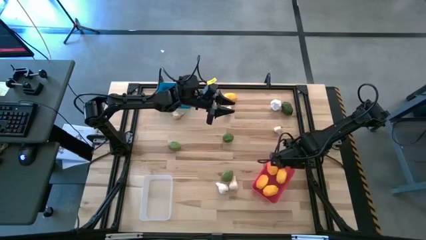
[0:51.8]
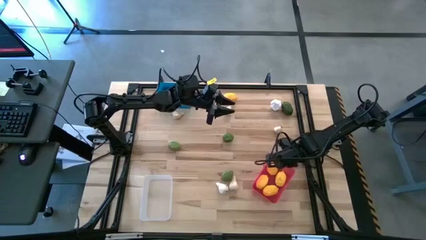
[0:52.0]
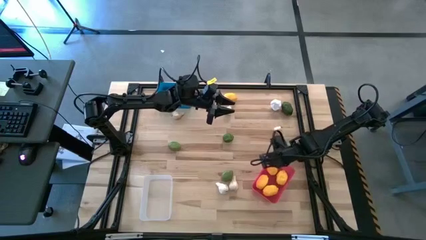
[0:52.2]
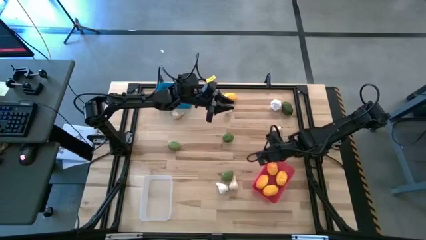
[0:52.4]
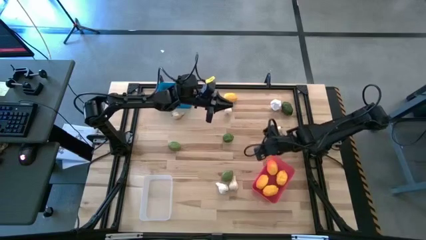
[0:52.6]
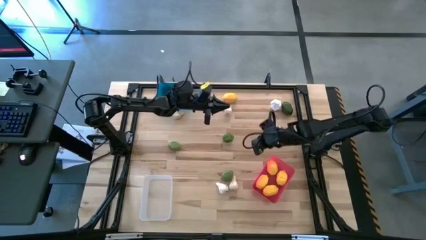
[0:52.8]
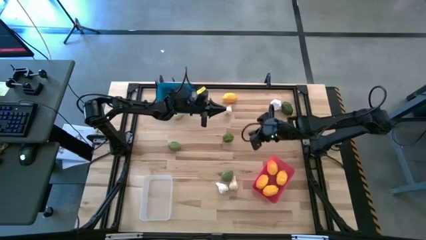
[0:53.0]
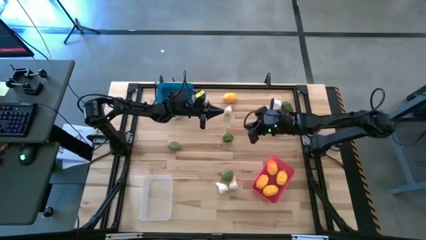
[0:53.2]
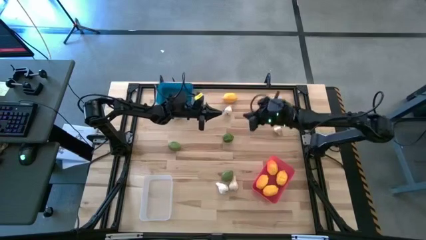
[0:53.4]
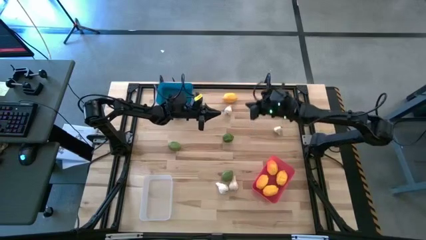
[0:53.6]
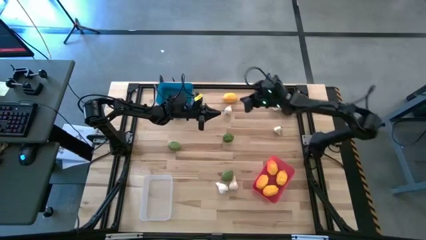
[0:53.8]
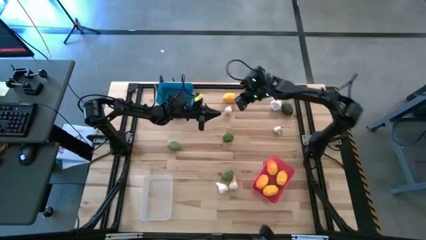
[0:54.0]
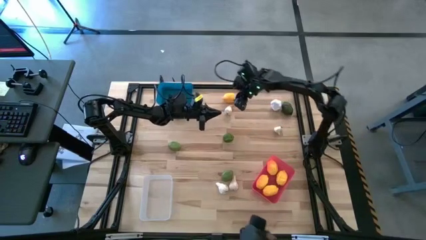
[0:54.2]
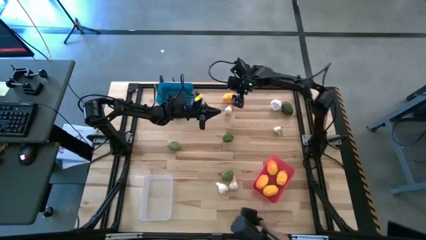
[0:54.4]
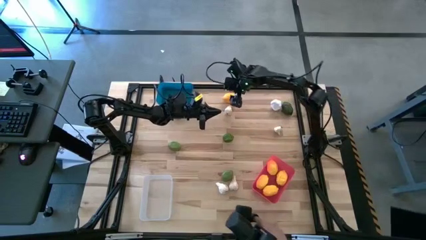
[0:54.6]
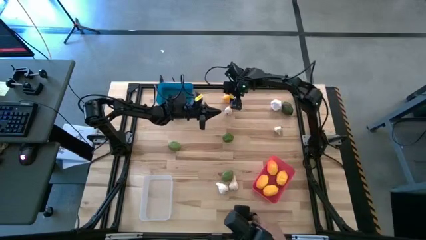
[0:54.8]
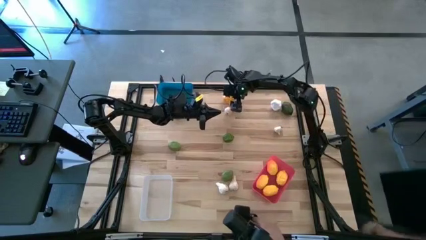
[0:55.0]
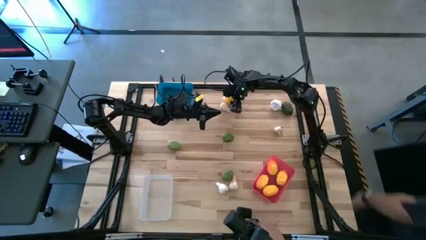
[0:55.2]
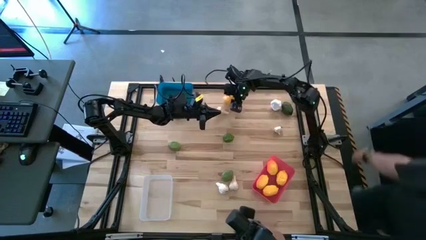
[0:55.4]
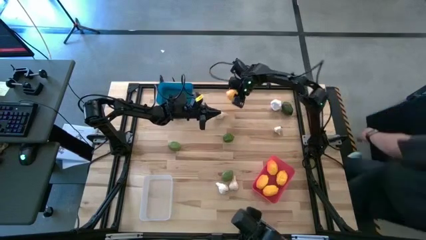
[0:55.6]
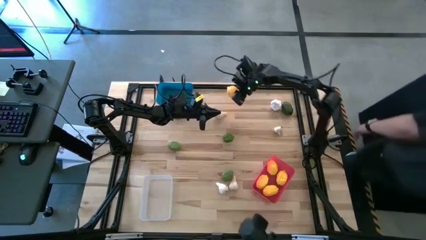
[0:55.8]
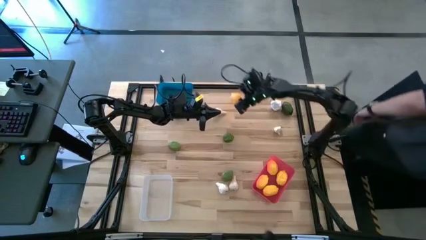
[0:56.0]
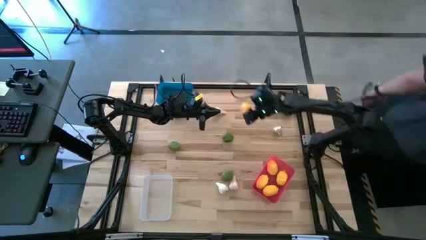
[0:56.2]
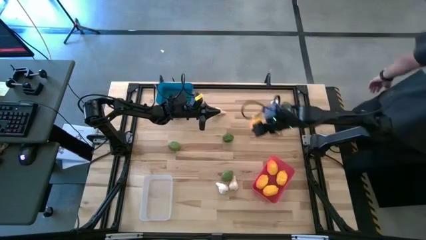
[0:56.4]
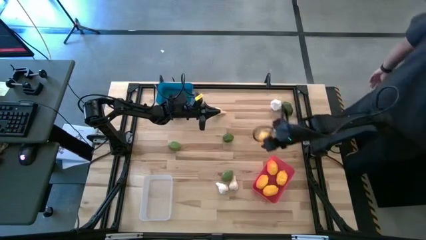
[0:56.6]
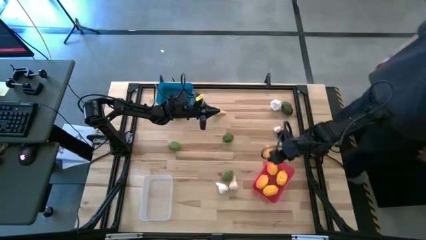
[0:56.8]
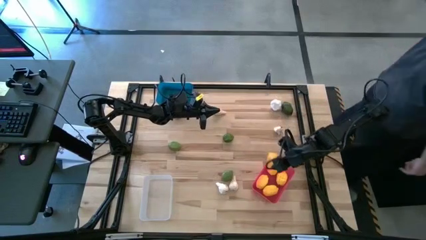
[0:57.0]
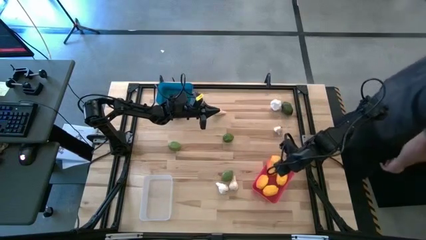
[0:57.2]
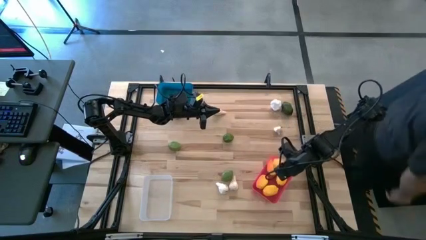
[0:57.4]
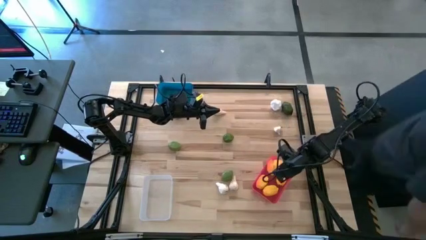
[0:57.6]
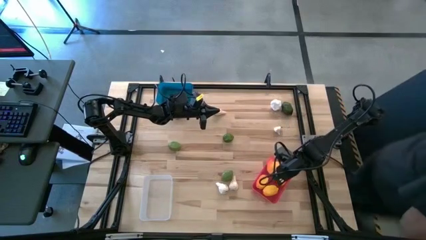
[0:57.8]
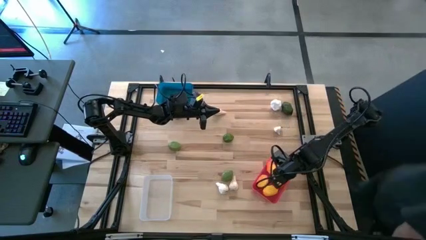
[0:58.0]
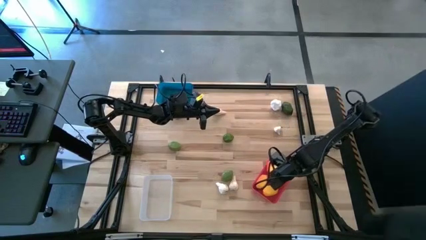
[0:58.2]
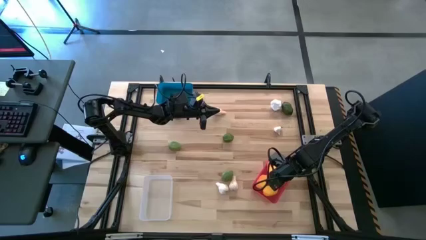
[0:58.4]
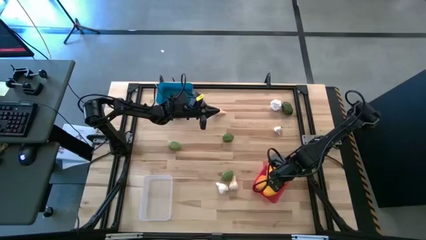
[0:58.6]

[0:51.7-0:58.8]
Task: Sort produce into baskets
Put the lemon into the red bin

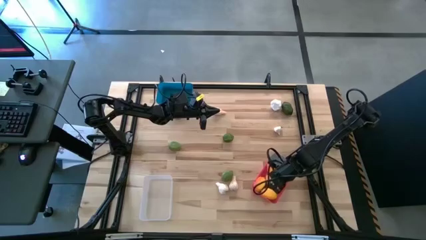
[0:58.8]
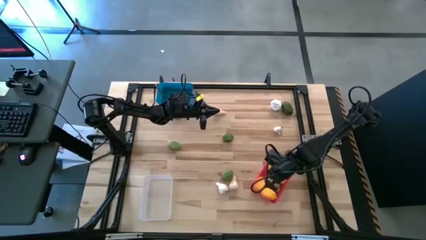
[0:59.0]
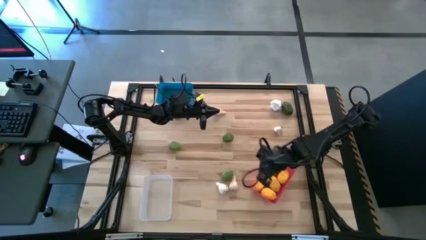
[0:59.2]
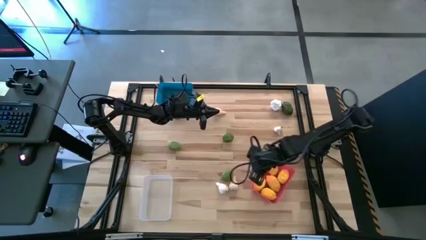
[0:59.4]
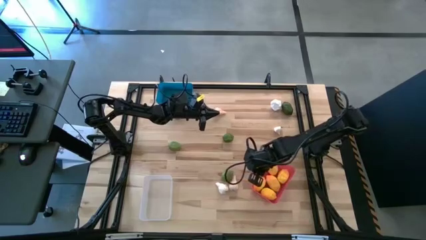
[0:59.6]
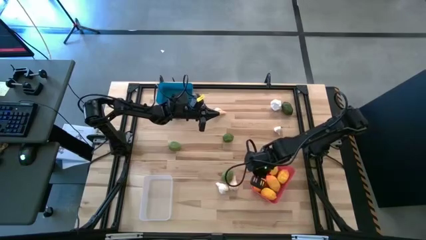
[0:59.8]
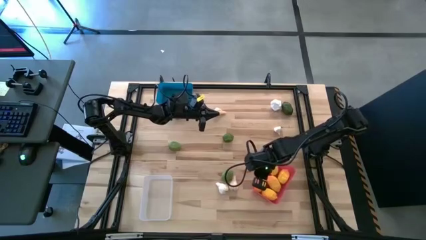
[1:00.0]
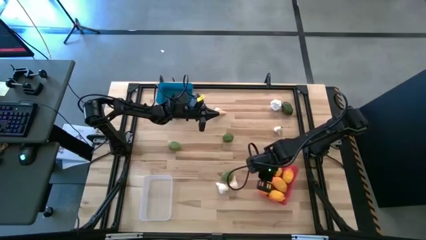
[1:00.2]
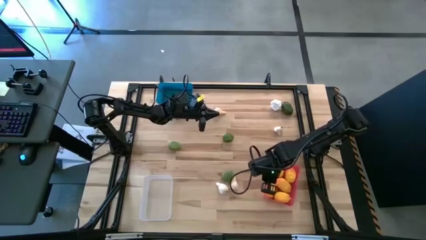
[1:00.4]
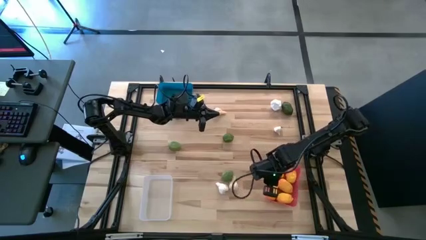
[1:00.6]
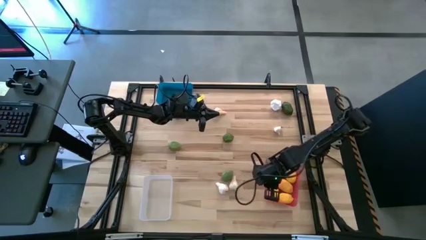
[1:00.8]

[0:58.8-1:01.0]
Adjust the red bin on the of the table

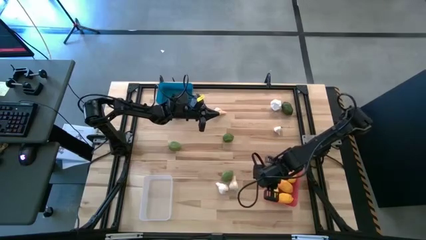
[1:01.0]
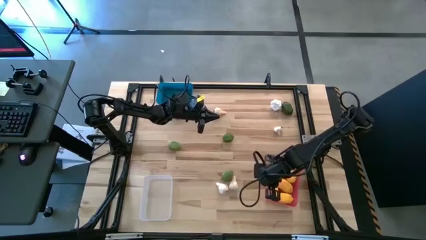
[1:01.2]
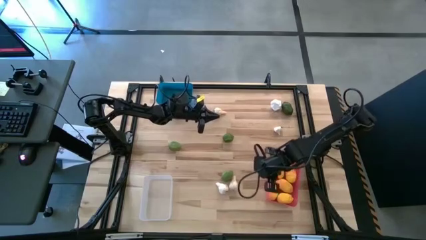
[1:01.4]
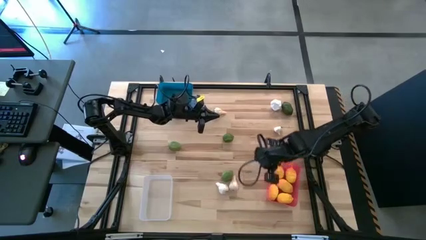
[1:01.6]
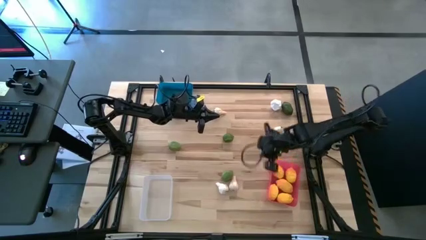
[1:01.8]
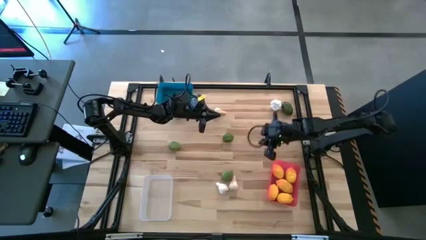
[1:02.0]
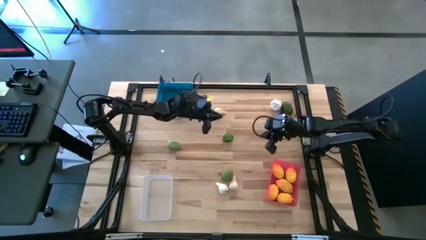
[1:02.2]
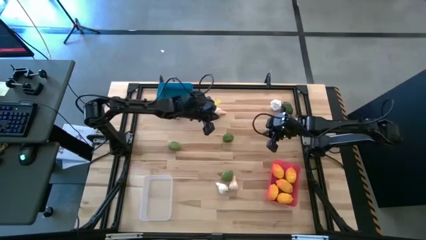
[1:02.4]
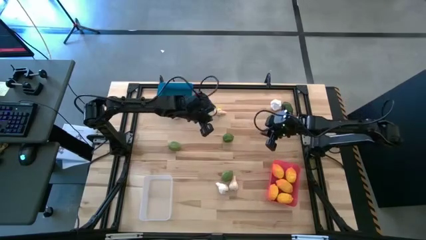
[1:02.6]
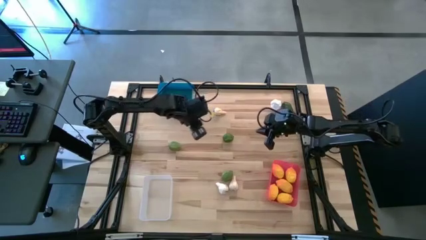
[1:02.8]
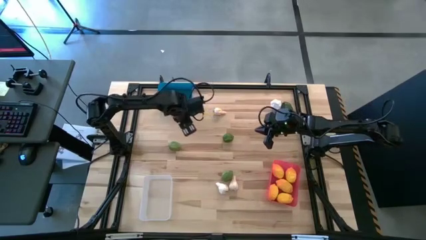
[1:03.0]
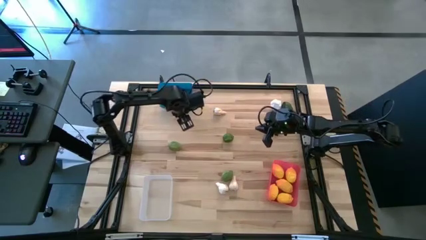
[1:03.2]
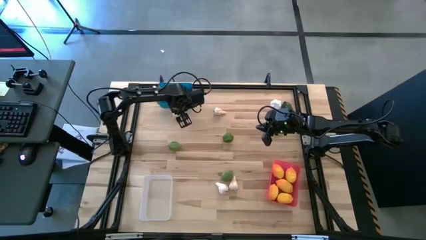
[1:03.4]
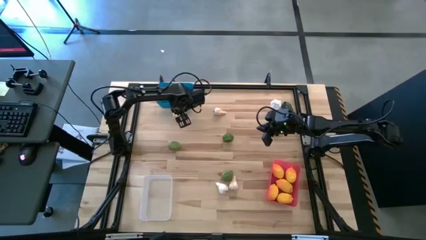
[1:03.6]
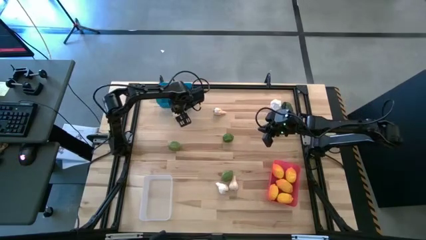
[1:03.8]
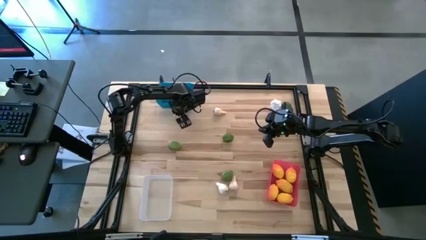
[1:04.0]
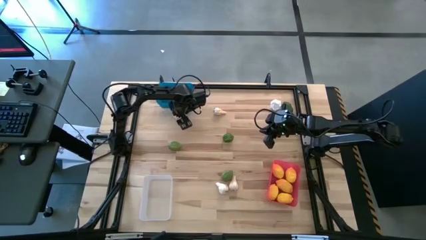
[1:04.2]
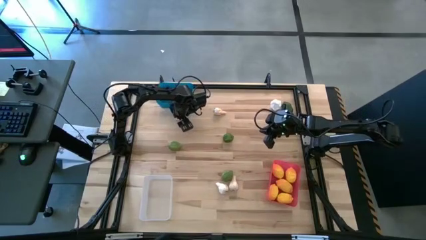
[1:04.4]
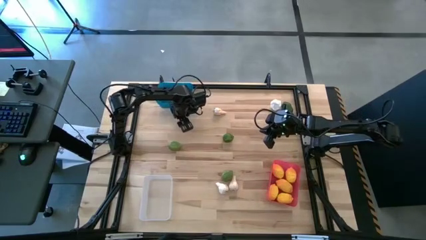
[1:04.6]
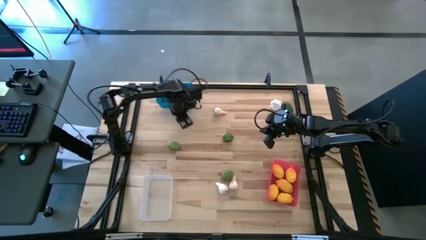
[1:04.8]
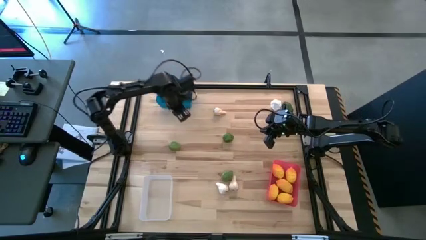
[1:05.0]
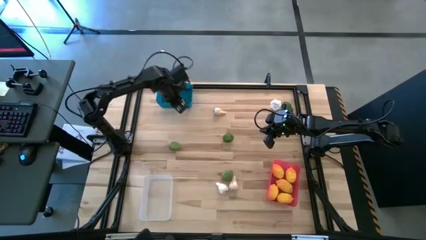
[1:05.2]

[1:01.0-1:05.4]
Put the garlic into the blue bin

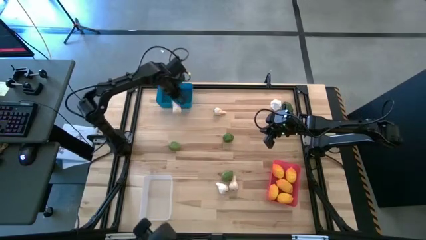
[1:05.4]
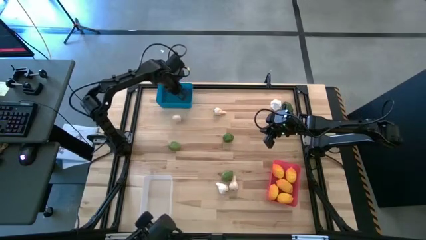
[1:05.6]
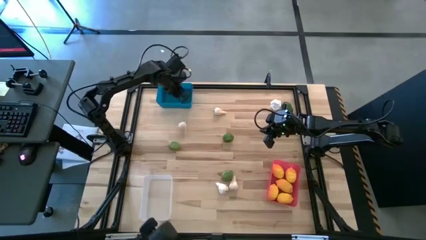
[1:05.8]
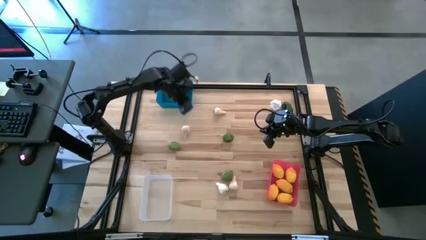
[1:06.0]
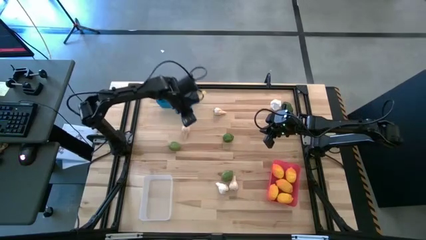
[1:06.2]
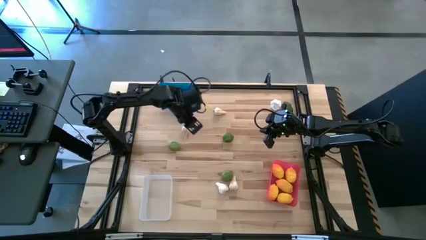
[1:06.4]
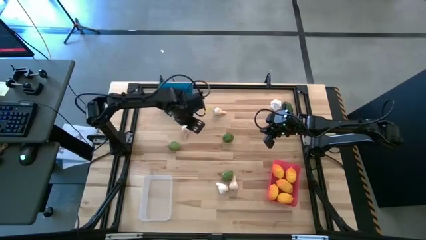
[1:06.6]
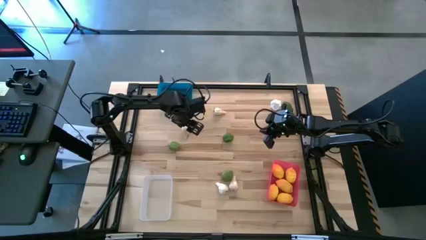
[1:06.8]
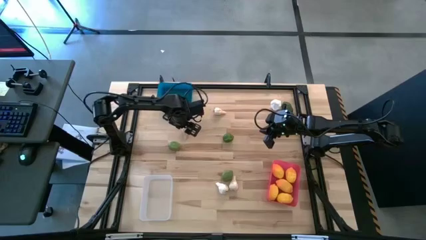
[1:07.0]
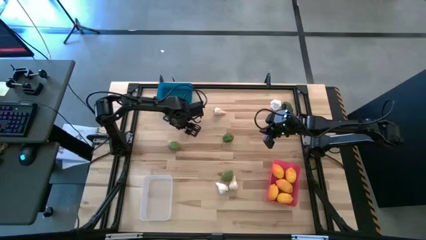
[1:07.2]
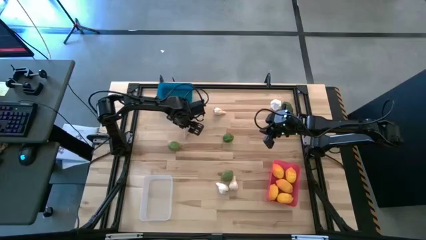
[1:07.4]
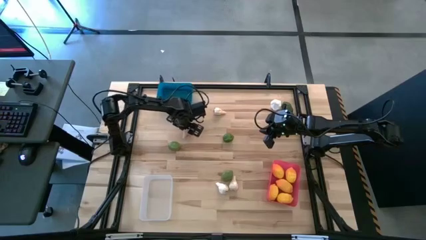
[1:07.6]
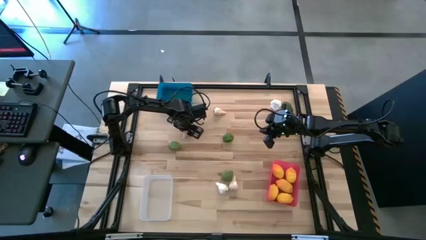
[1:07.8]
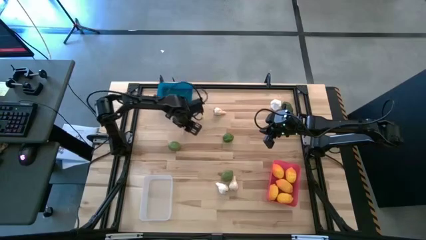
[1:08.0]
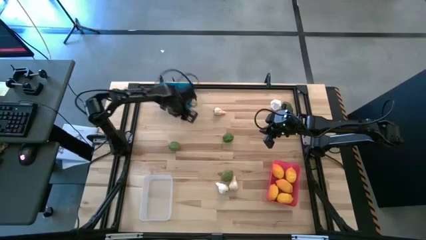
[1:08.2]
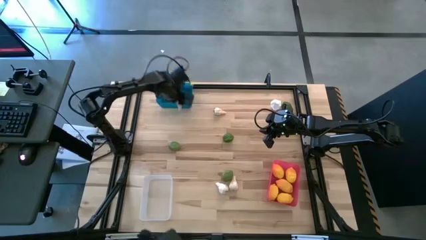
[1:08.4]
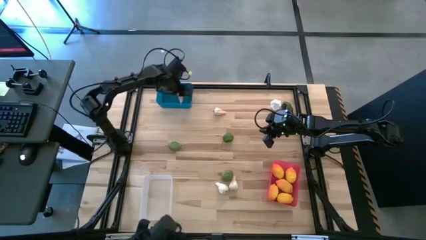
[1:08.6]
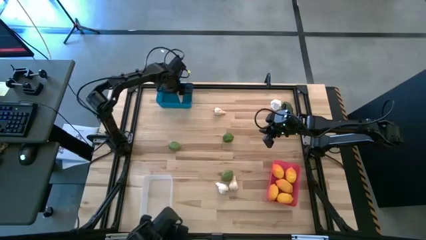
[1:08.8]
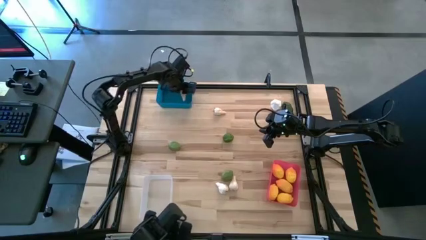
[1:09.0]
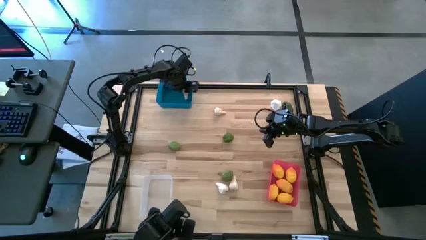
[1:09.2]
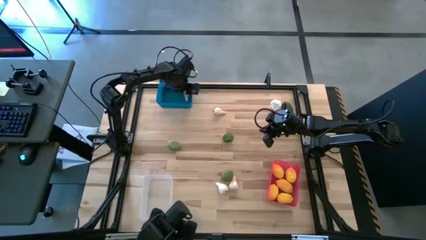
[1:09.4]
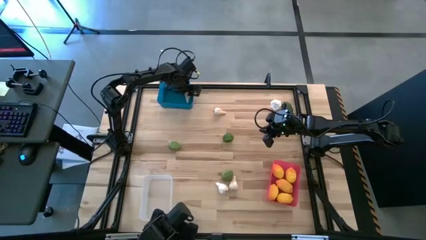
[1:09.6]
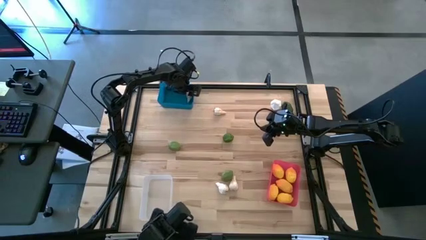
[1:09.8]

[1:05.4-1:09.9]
Put the garlic into the blue bin
